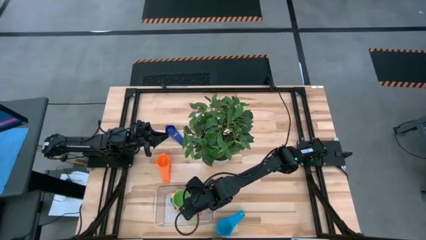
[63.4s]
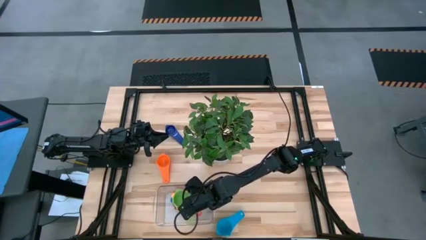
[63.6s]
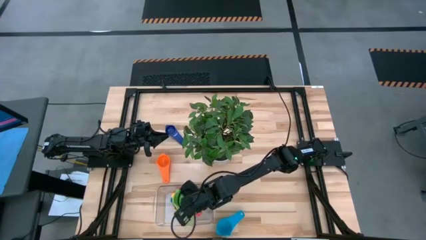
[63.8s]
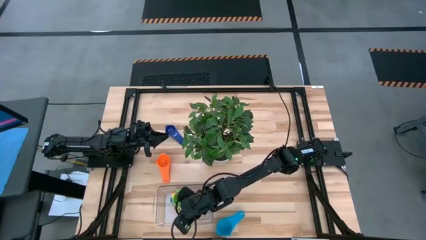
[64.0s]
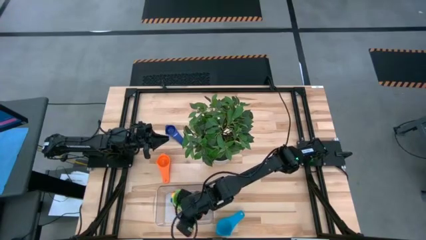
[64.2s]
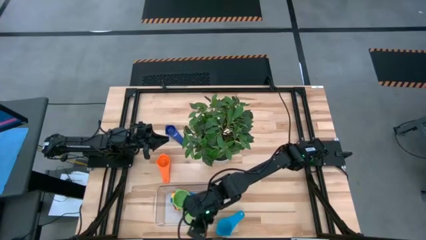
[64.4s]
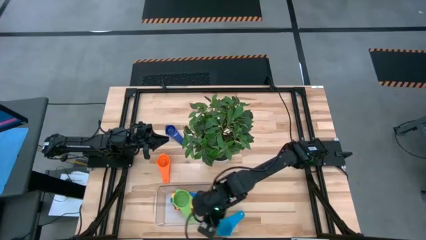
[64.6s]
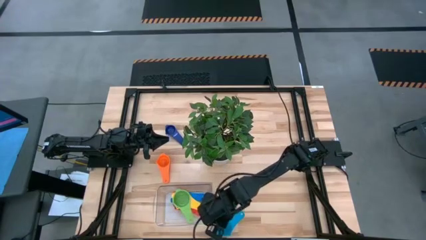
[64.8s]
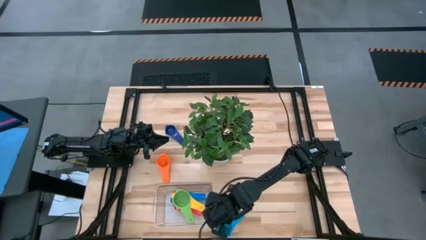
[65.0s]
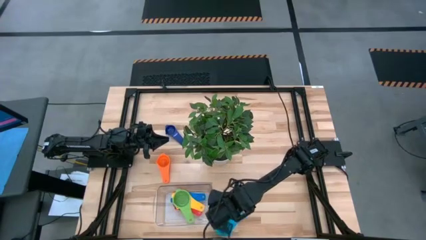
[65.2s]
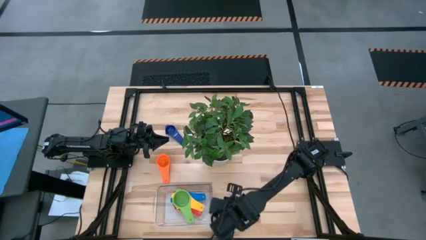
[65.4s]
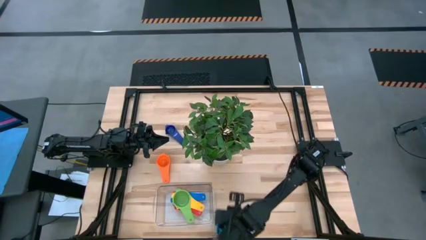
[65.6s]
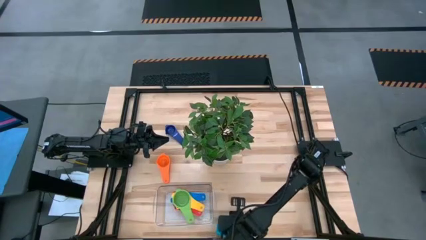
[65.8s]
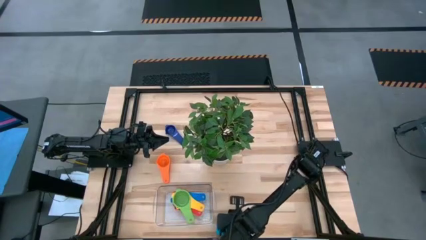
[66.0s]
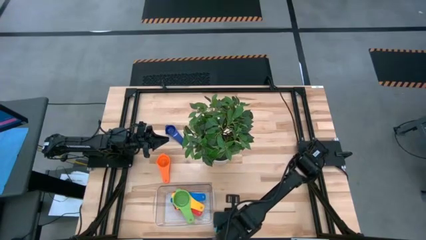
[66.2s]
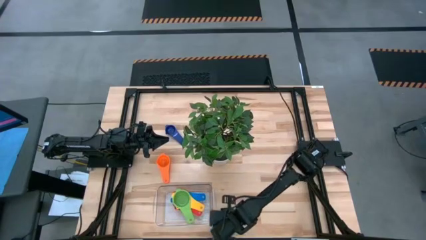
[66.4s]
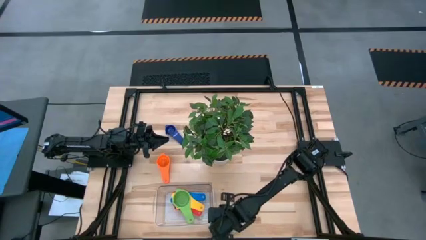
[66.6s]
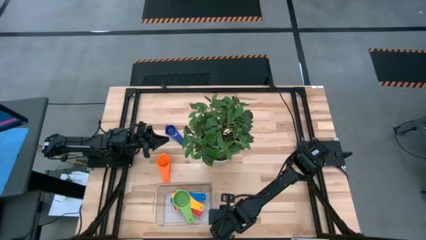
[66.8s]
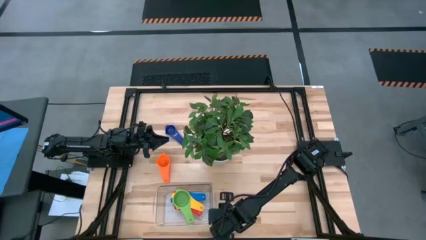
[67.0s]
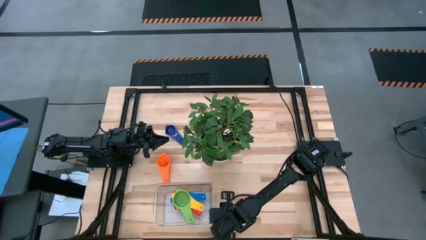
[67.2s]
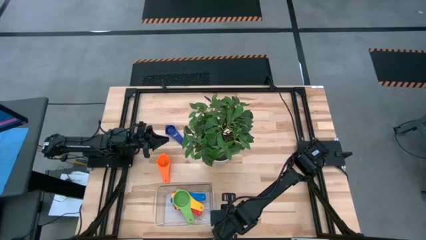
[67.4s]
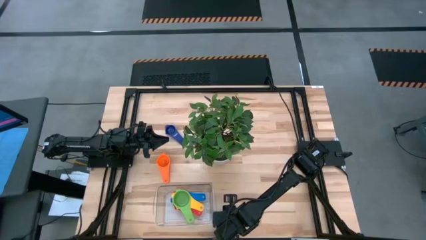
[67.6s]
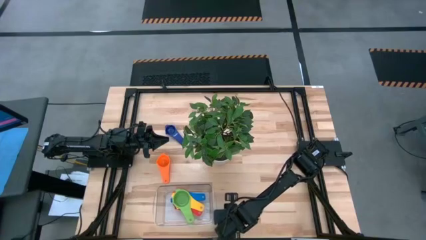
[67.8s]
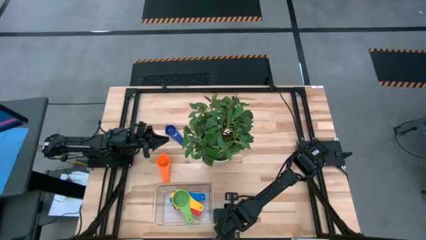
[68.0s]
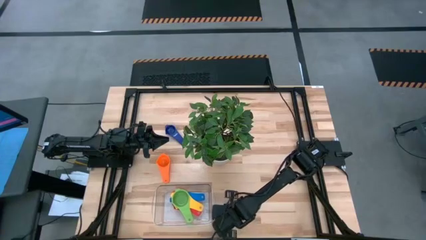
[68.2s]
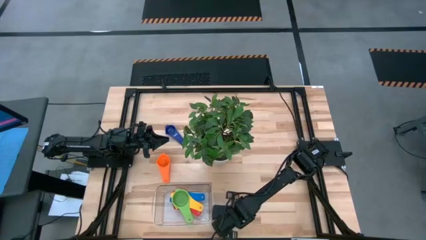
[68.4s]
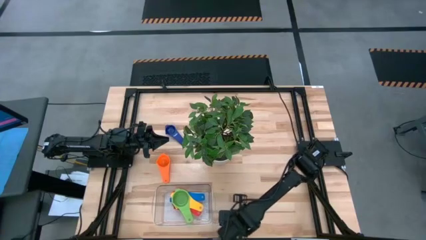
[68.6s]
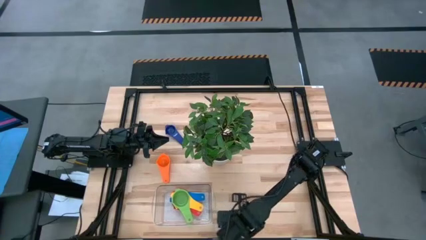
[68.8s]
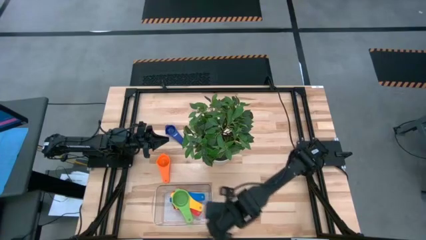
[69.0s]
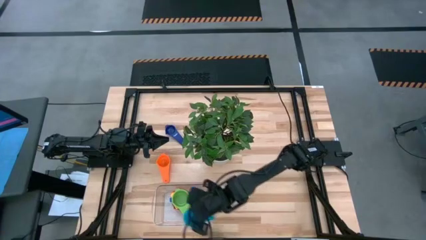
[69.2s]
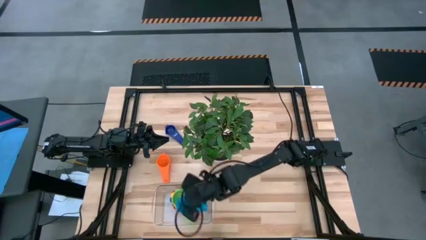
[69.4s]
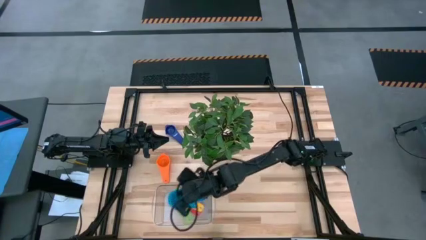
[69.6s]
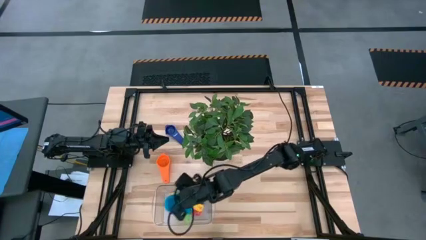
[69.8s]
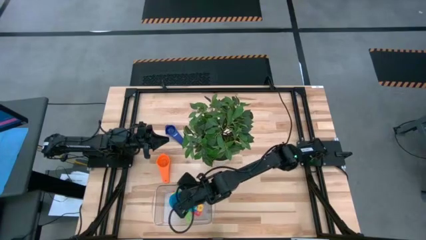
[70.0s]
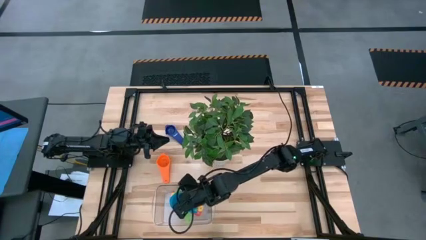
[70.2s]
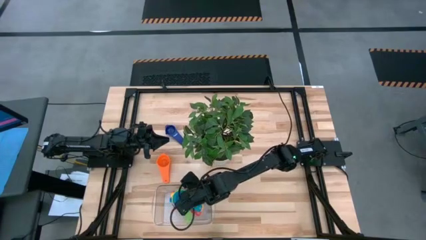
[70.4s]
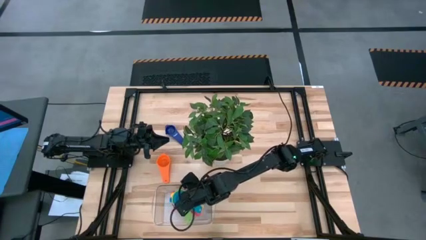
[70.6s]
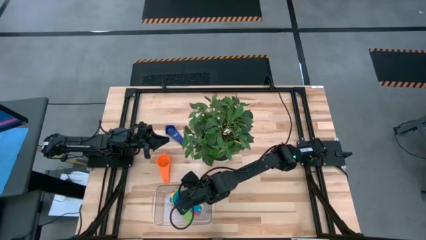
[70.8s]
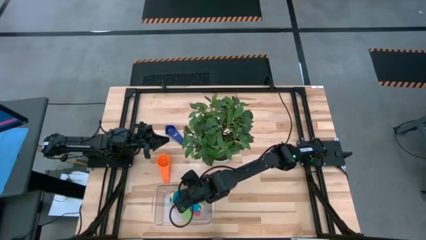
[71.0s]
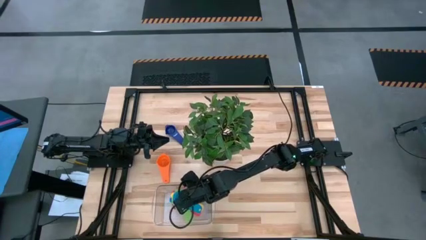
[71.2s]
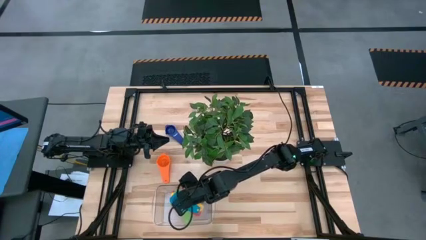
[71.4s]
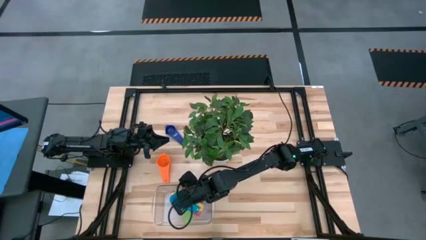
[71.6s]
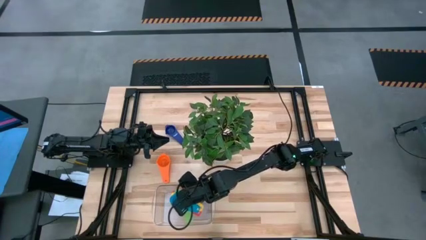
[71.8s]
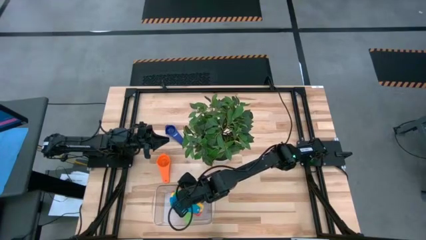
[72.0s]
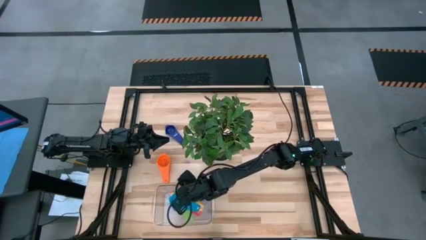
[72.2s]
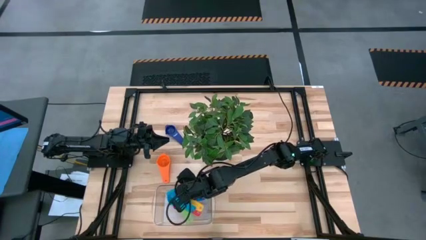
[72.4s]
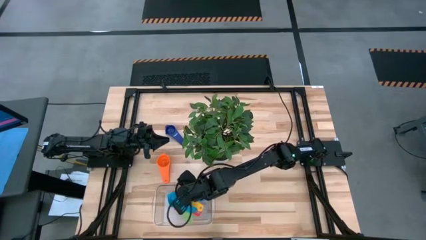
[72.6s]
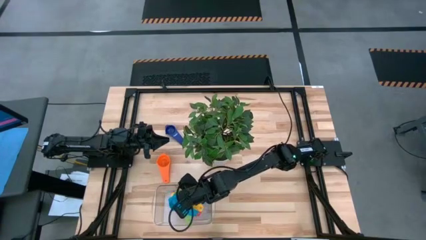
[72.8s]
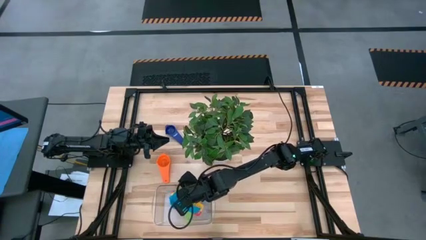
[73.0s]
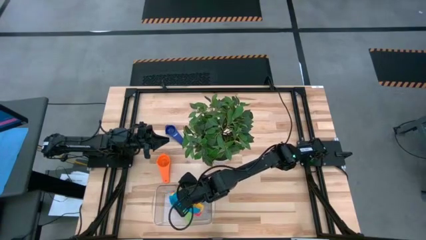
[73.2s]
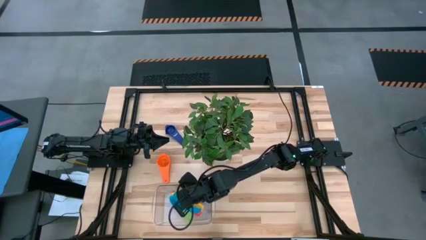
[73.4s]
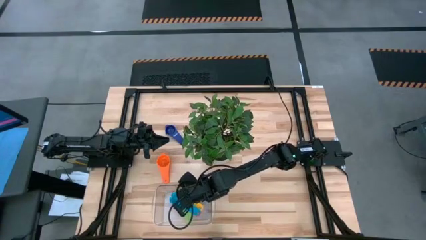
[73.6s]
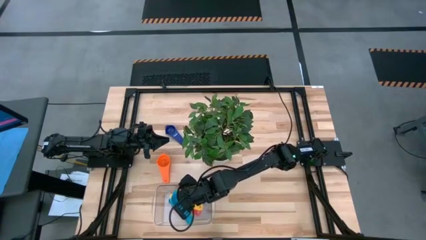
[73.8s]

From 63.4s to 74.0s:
Task: Nest measuring cups in basket
Stack the light blue measuring cup on the green measuring cup

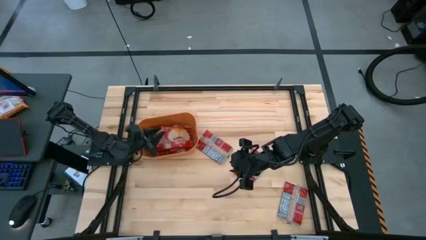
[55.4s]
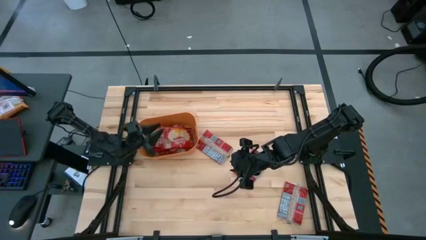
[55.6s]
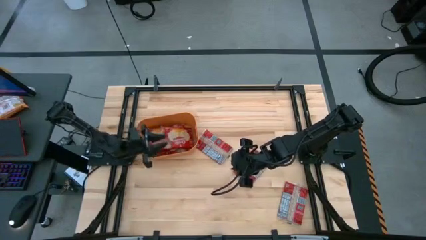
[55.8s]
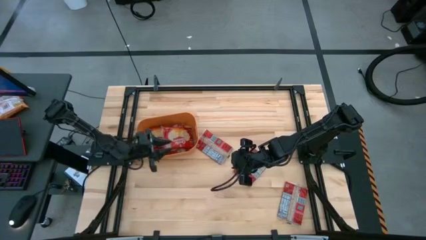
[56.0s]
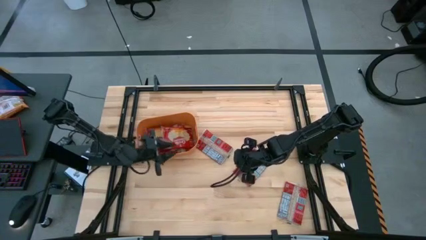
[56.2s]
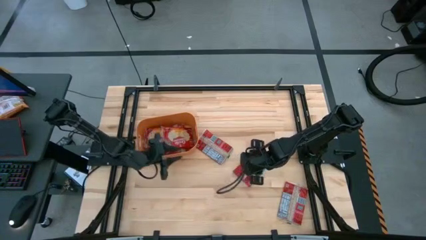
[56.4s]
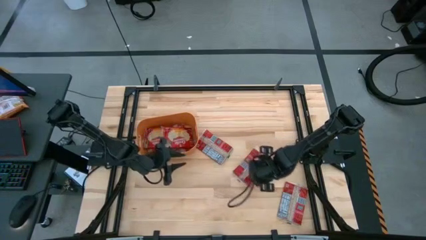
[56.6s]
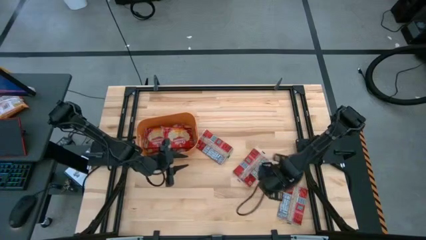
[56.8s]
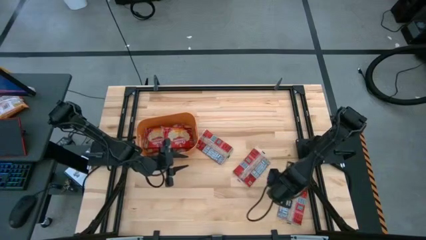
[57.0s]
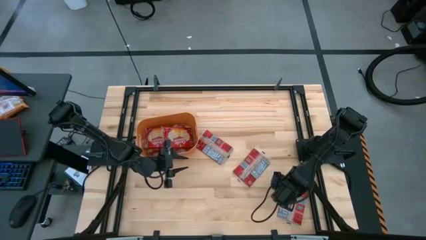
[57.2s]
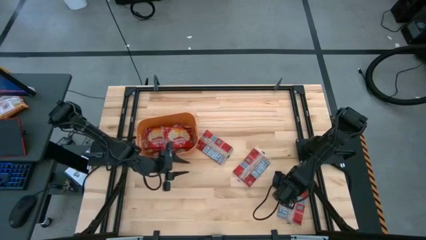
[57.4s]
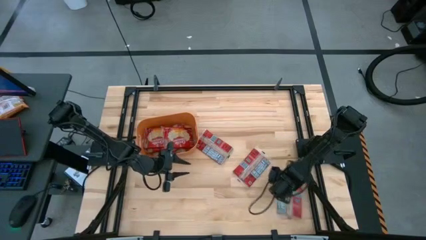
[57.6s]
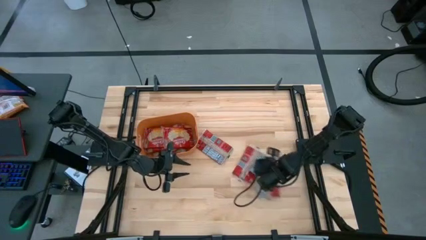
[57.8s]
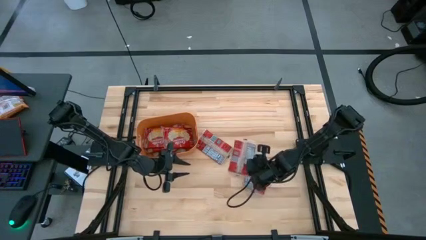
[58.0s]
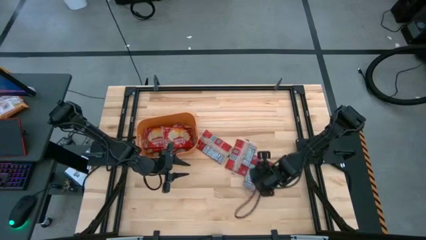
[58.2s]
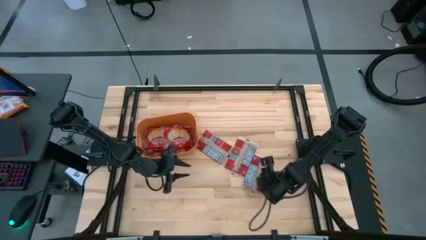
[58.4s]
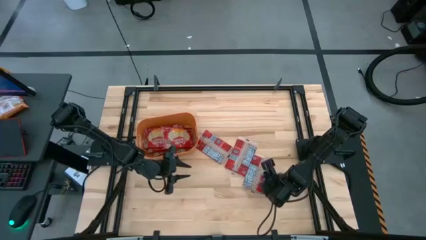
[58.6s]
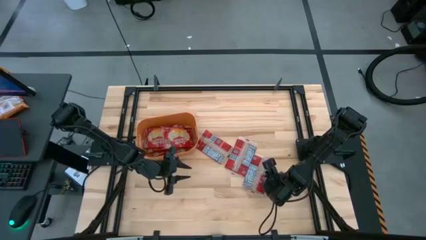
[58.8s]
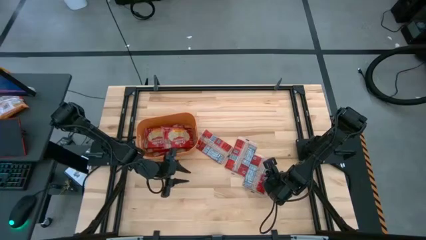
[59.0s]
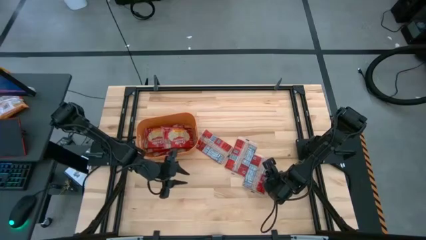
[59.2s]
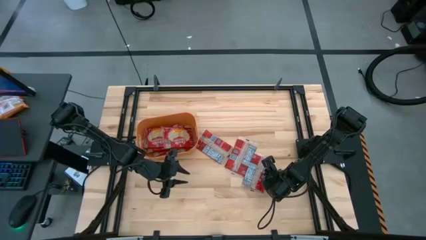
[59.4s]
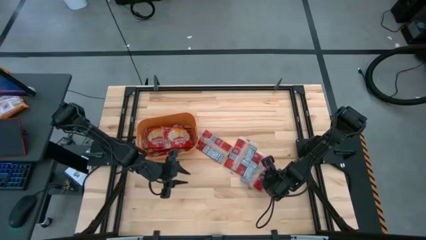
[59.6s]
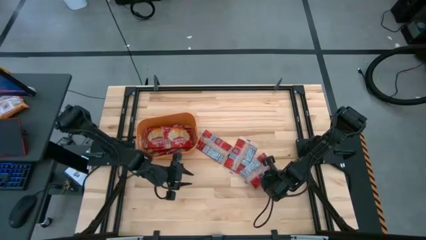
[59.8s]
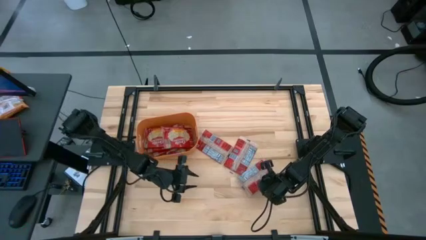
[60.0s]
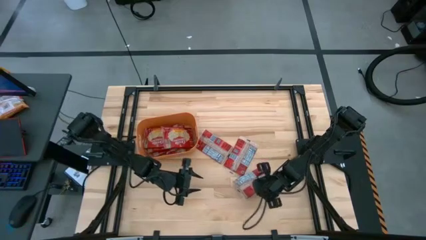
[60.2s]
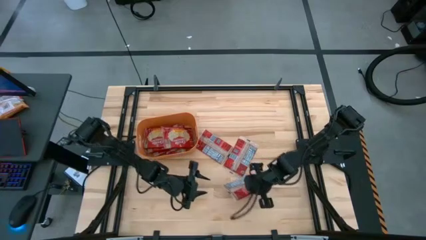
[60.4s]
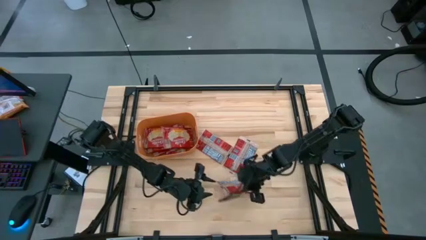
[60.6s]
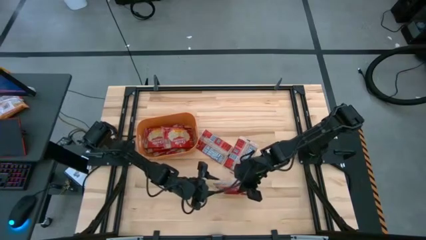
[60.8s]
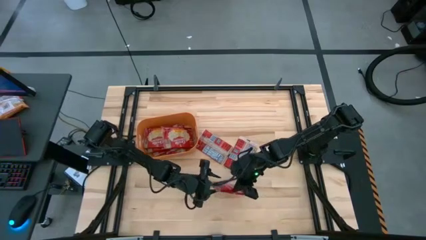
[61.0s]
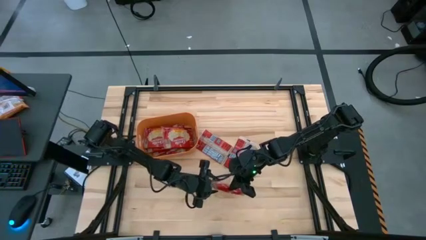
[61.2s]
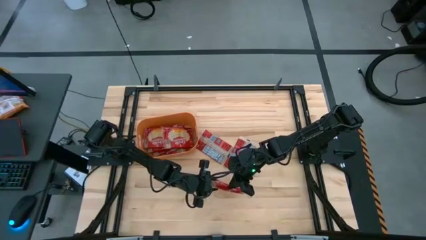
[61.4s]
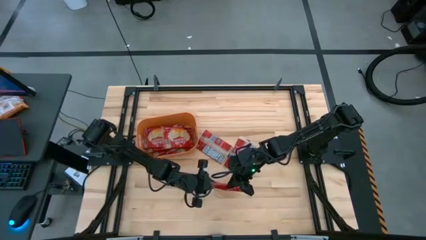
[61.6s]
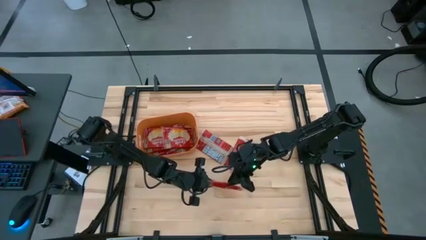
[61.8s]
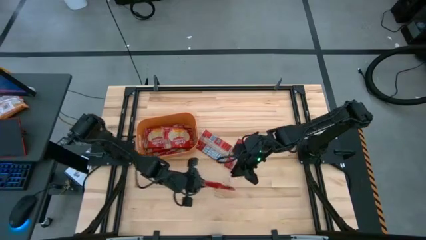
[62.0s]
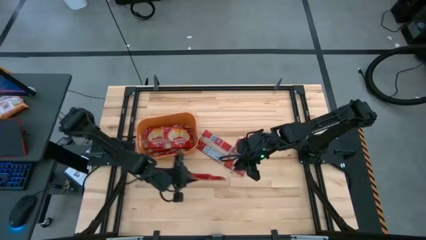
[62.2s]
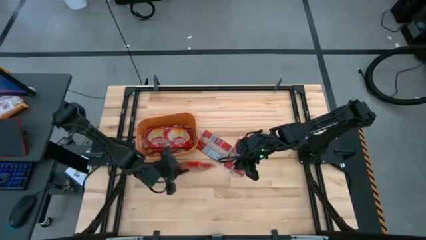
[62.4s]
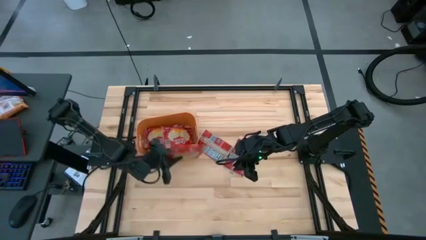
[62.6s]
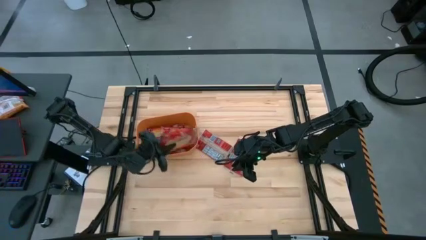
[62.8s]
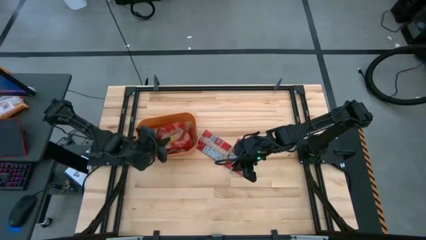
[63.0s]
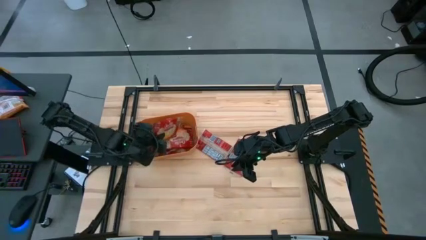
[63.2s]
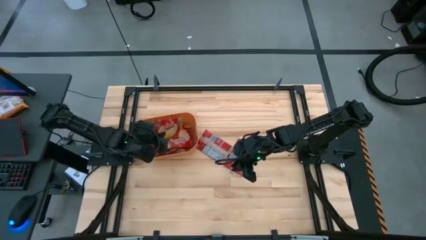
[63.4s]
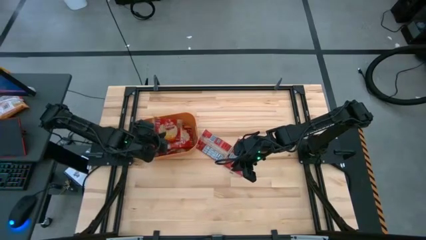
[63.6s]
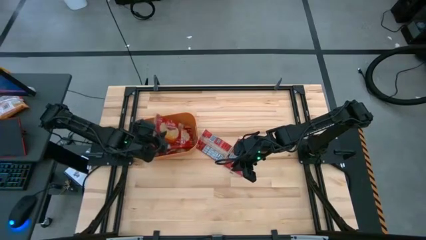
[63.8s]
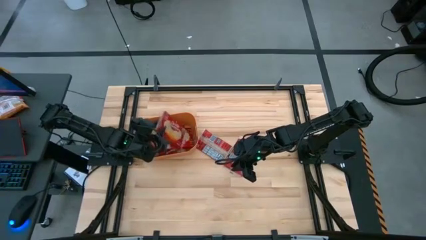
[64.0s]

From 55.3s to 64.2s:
Task: Sort popcorn bags into baskets
Put the red popcorn bag into the orange bin
